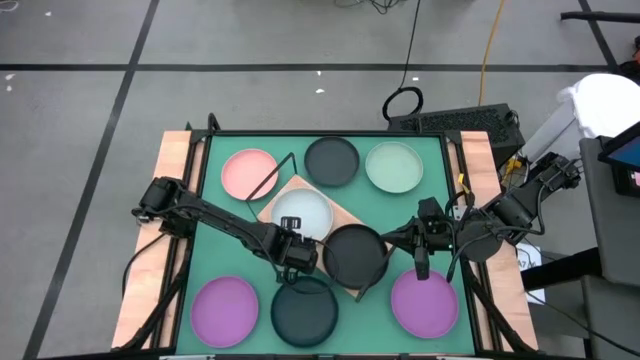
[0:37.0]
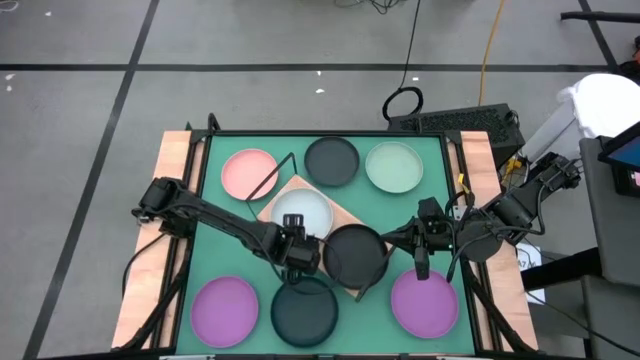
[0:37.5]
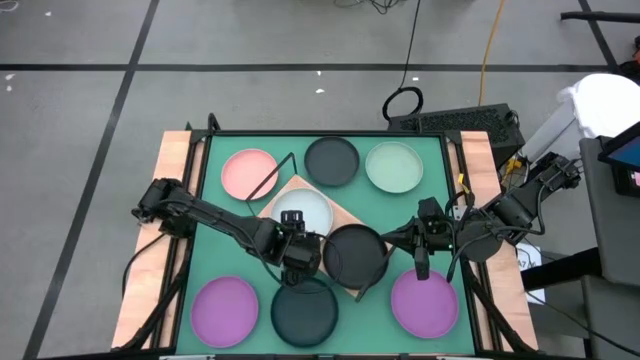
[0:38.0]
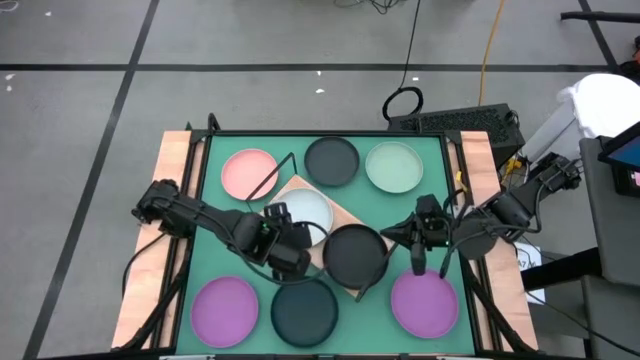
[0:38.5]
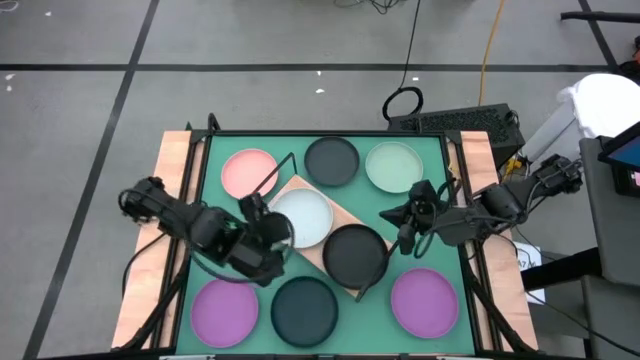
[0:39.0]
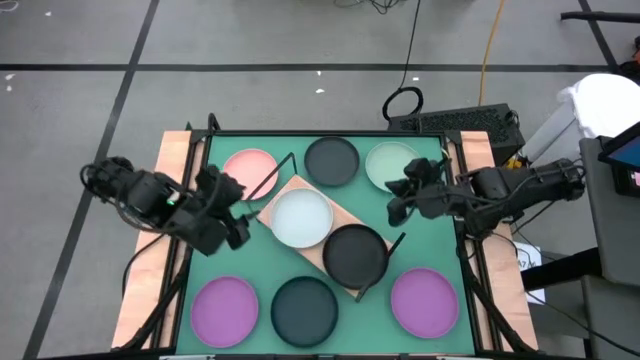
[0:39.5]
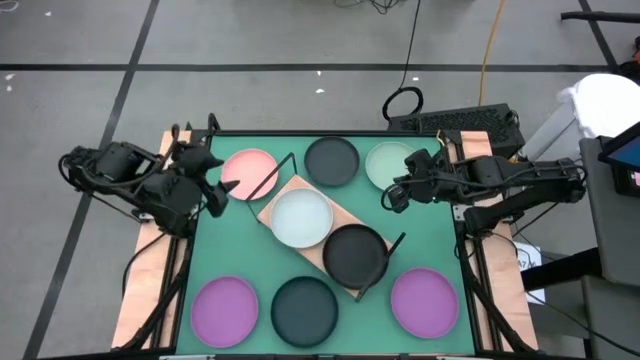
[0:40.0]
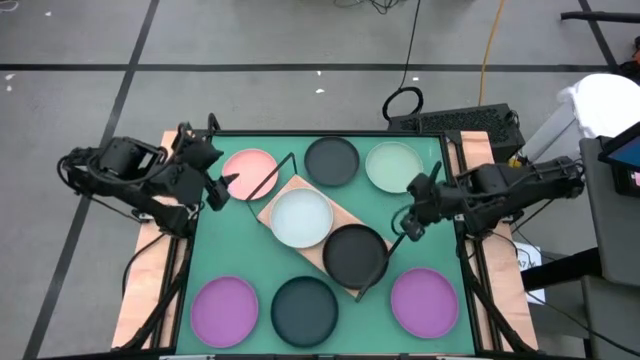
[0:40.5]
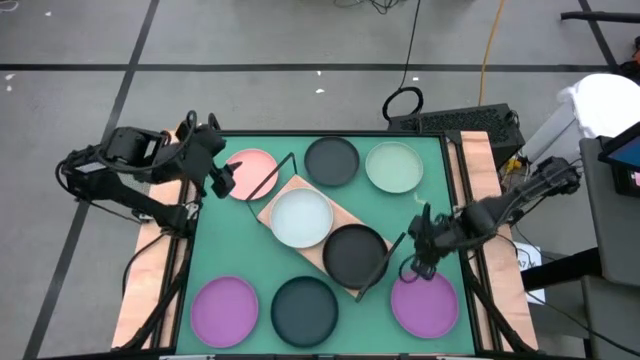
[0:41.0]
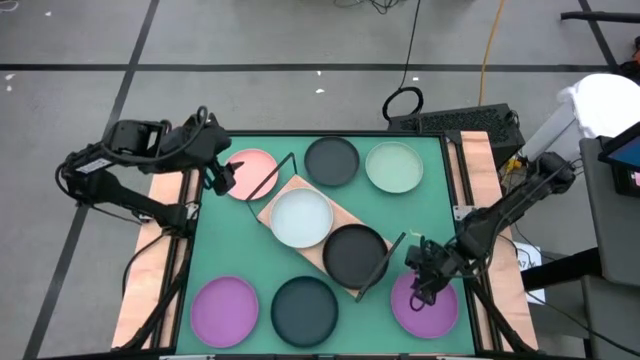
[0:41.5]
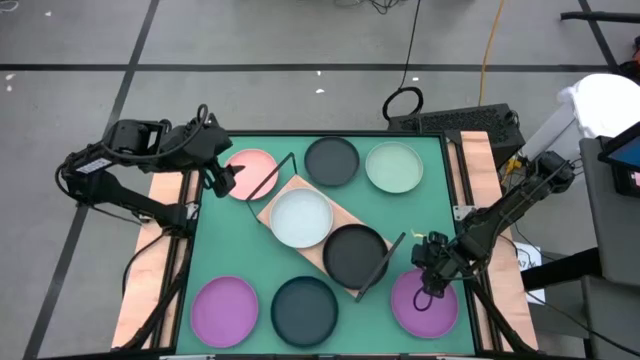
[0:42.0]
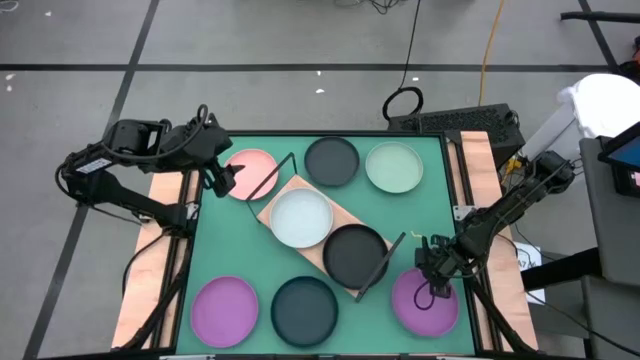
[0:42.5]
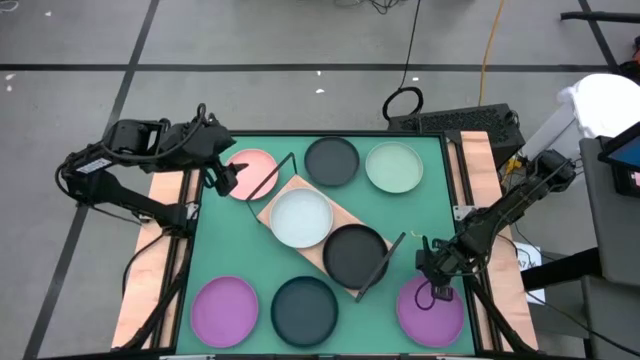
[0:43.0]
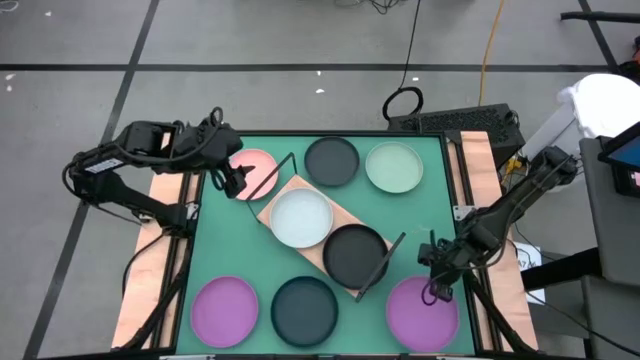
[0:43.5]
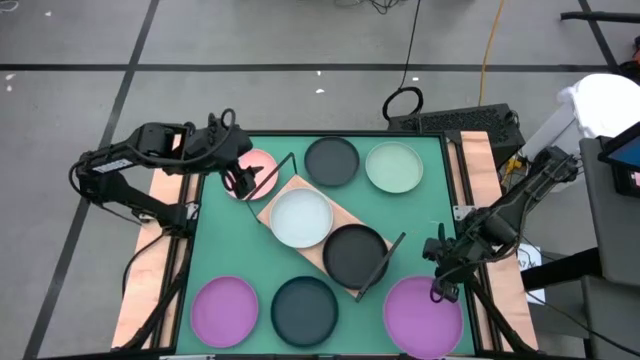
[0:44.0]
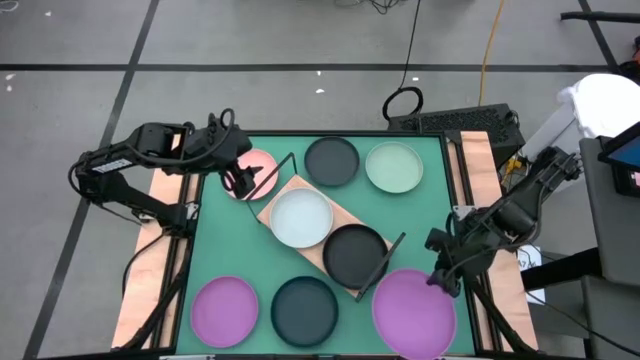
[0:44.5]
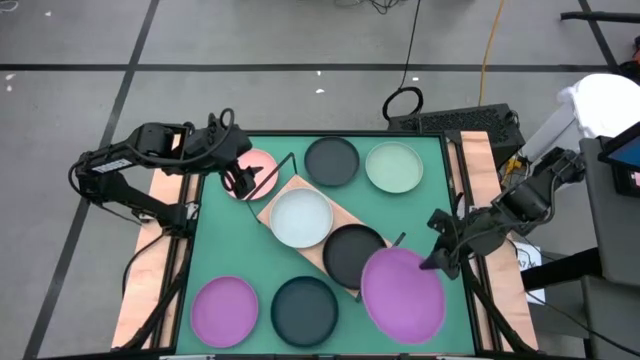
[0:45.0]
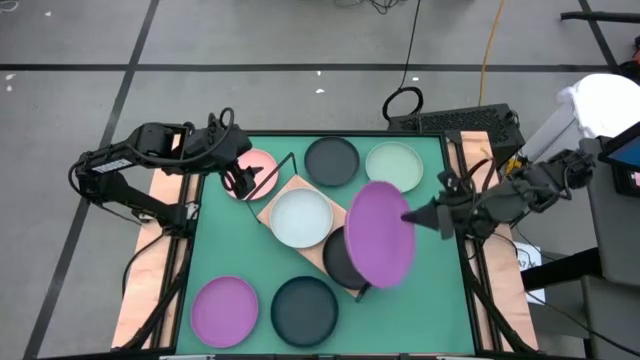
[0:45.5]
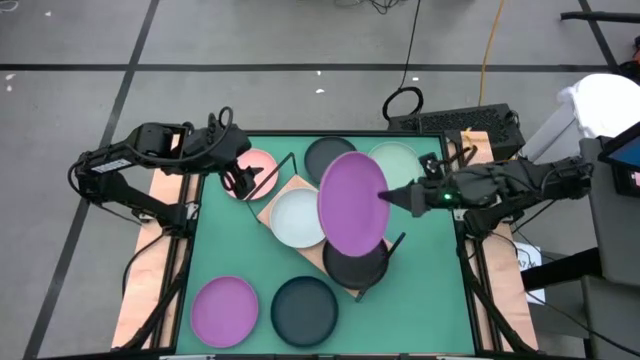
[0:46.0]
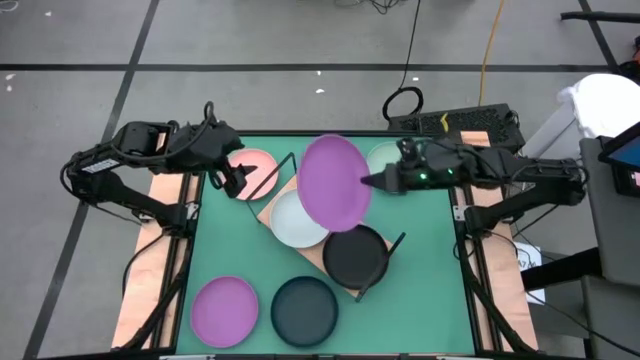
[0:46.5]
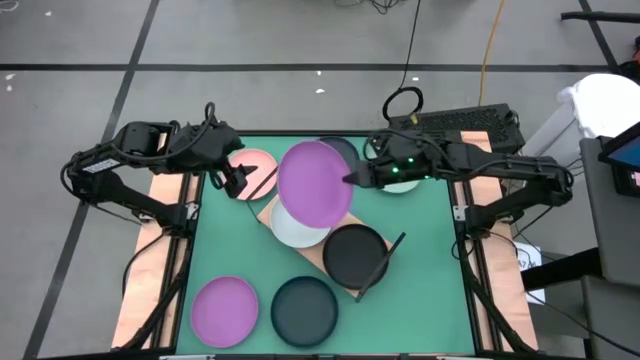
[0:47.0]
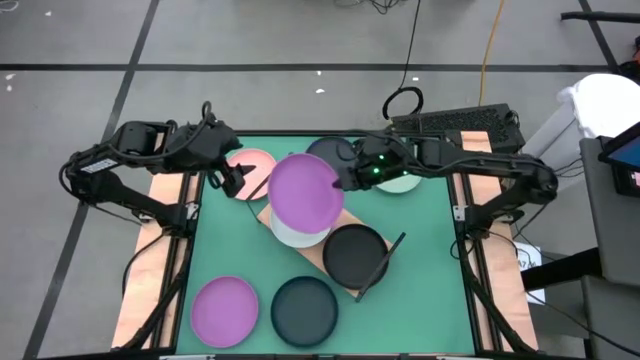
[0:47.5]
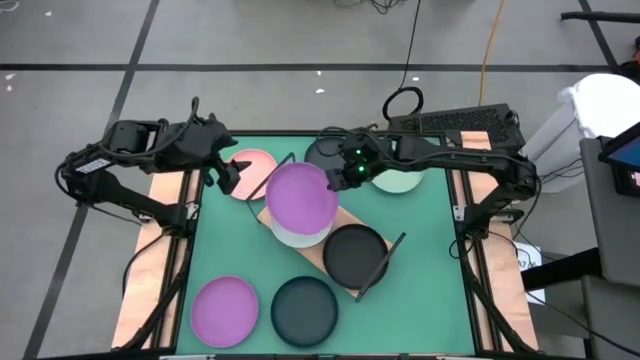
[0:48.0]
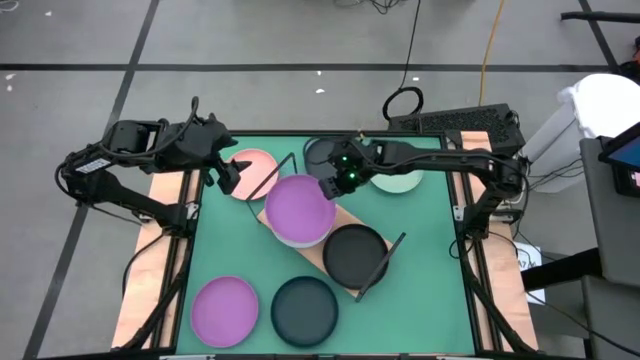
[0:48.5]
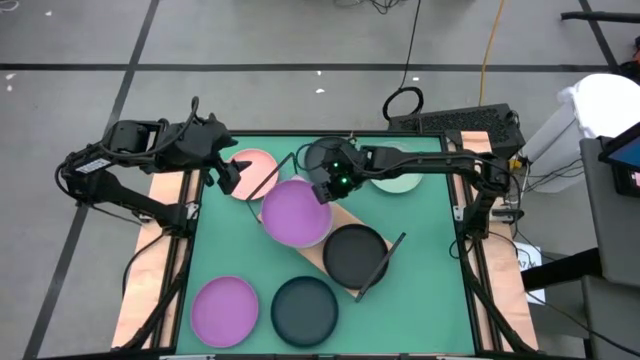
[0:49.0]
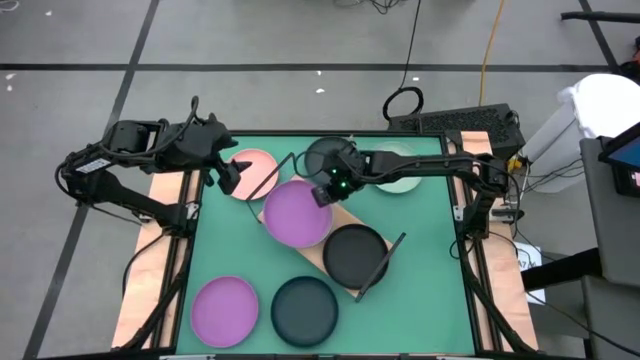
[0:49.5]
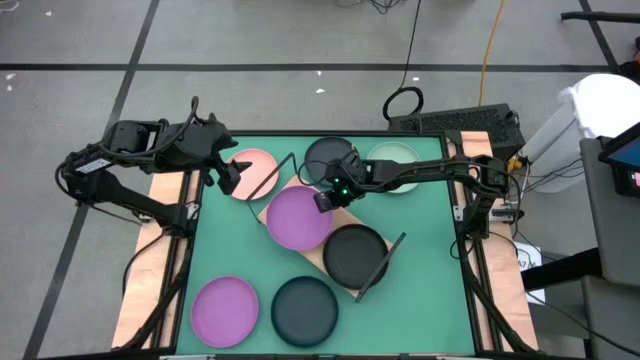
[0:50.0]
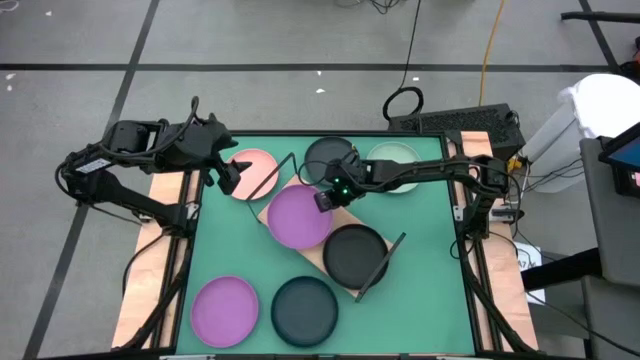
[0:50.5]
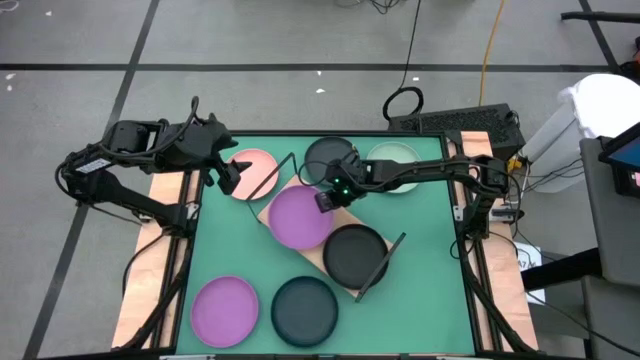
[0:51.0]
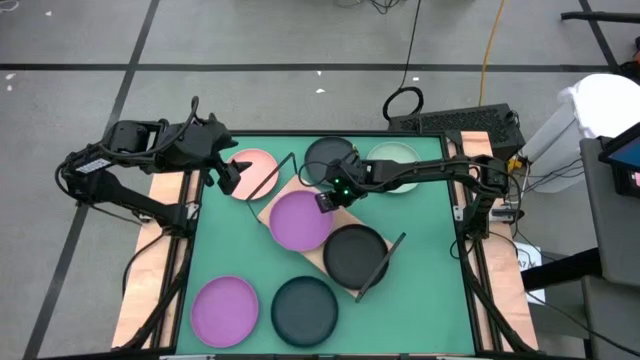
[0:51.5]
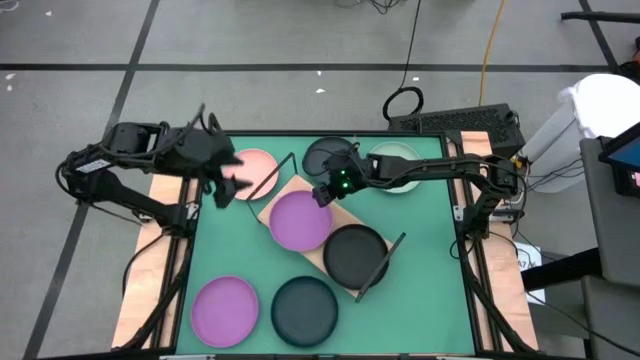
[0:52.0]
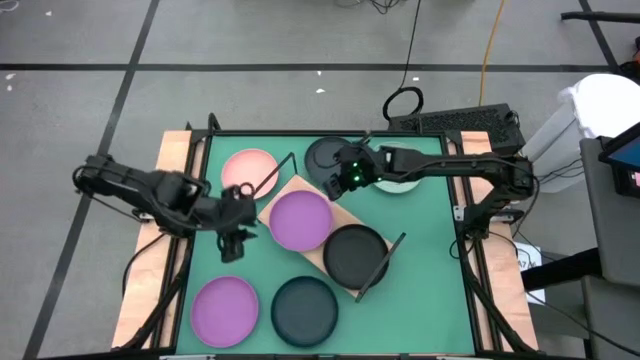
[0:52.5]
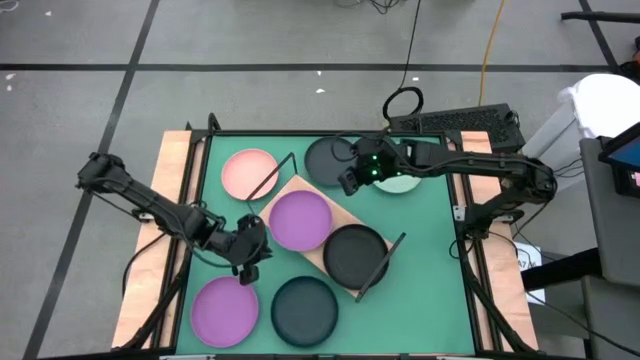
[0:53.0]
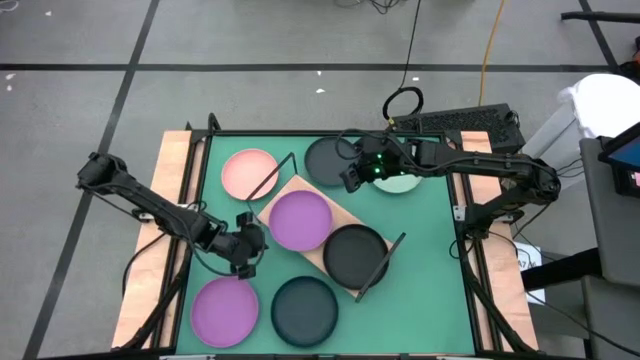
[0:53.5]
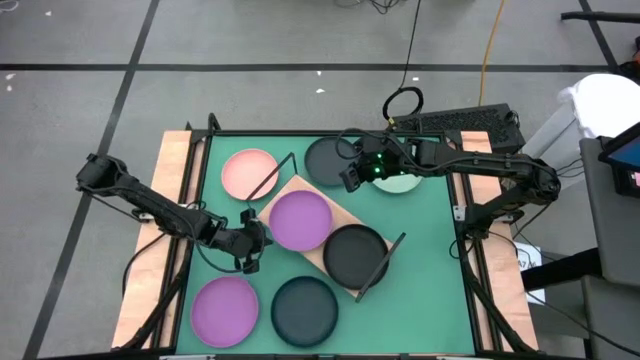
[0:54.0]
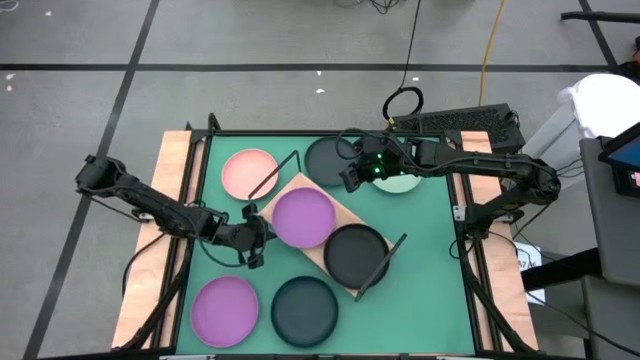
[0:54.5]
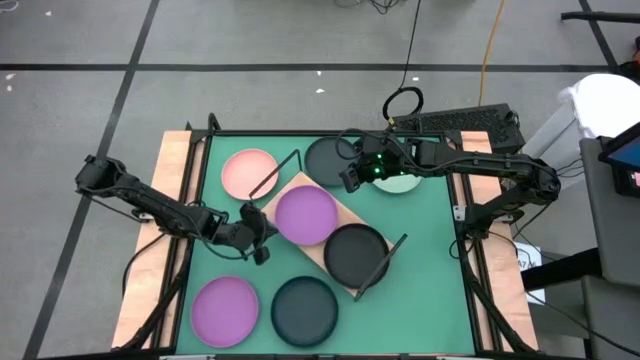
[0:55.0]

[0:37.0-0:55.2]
Task: Place and stack plates onto a shelf
Stack the violet plate on the gray plate on the shelf
